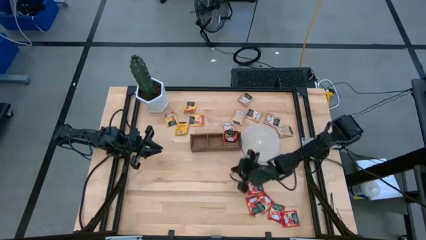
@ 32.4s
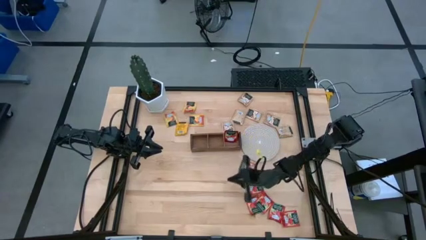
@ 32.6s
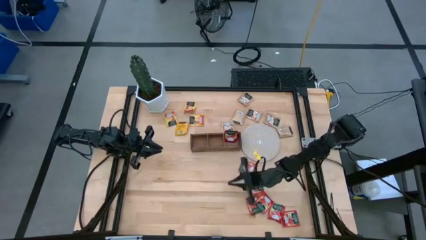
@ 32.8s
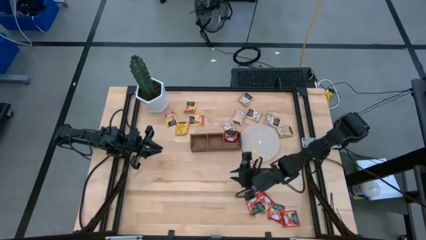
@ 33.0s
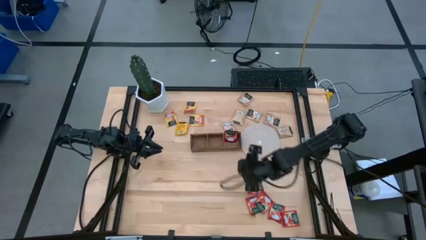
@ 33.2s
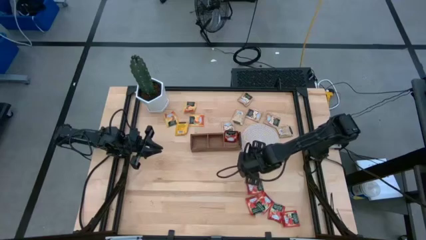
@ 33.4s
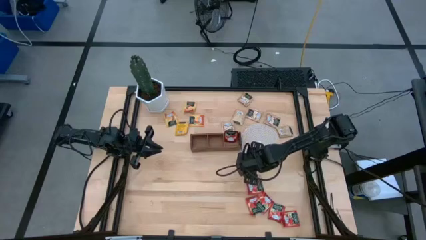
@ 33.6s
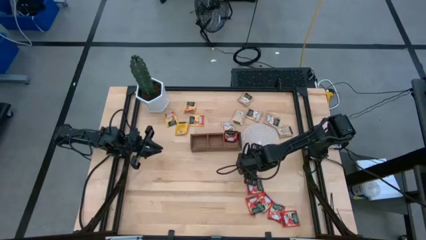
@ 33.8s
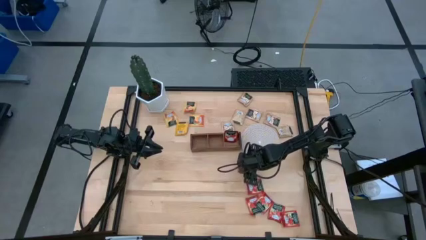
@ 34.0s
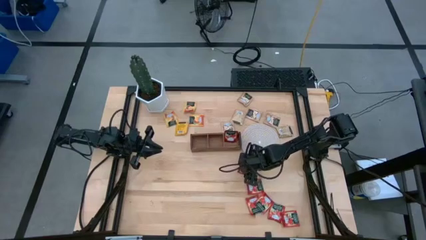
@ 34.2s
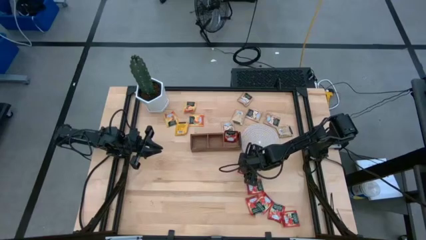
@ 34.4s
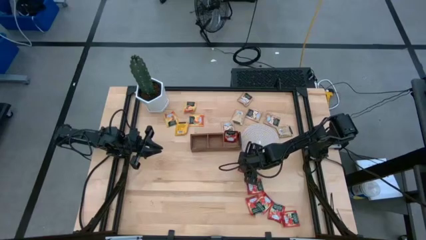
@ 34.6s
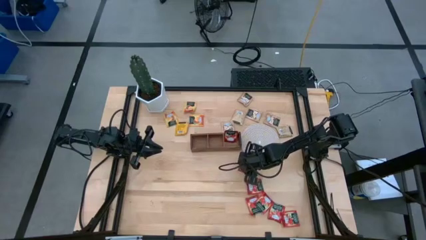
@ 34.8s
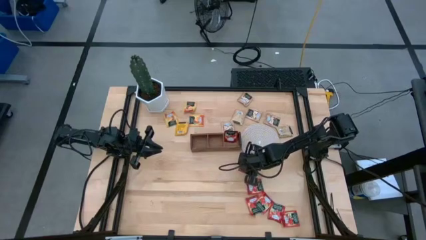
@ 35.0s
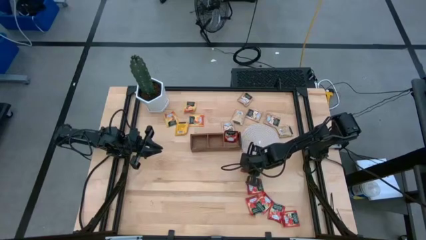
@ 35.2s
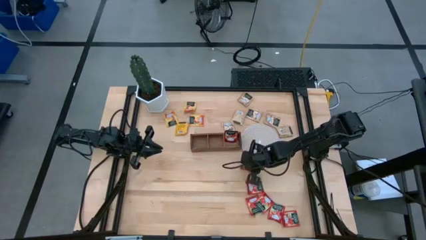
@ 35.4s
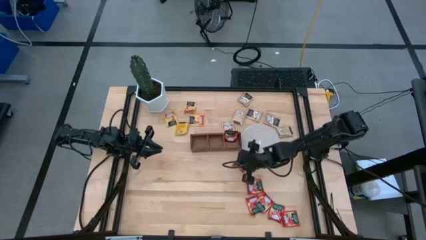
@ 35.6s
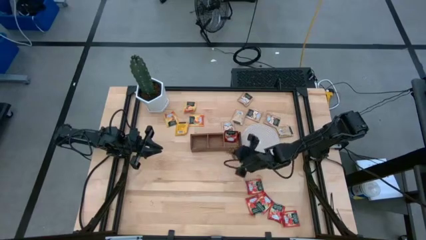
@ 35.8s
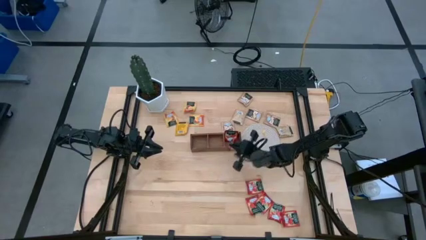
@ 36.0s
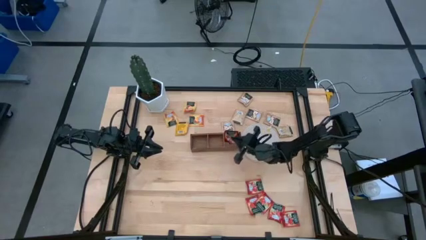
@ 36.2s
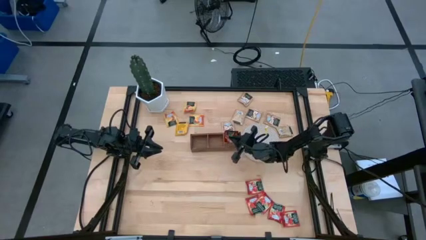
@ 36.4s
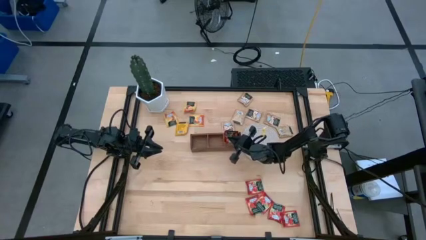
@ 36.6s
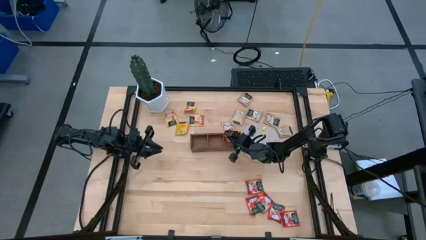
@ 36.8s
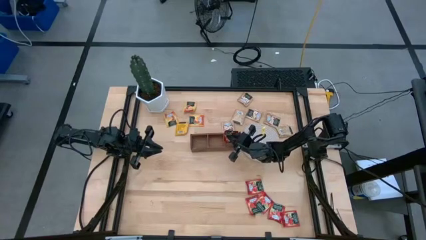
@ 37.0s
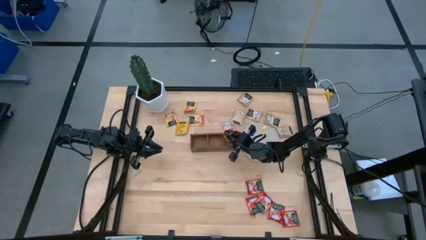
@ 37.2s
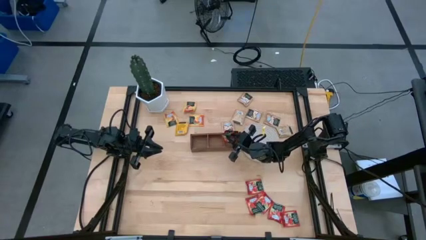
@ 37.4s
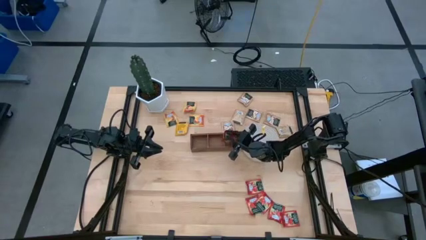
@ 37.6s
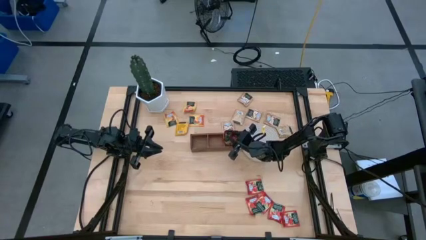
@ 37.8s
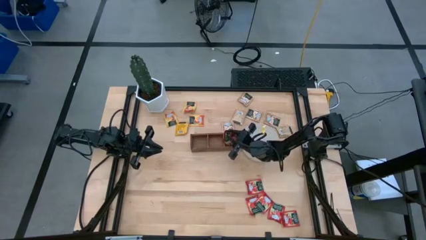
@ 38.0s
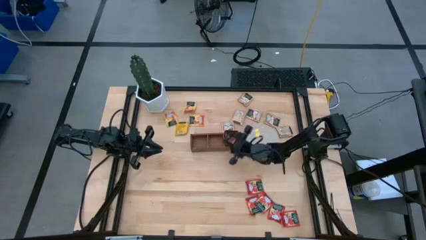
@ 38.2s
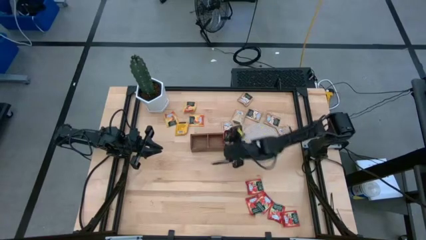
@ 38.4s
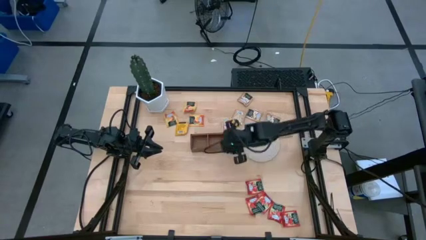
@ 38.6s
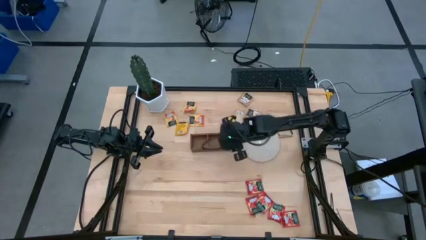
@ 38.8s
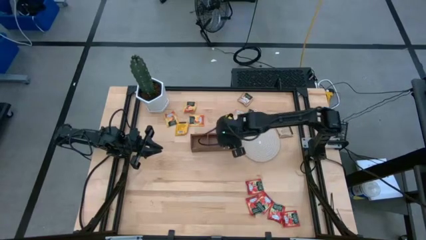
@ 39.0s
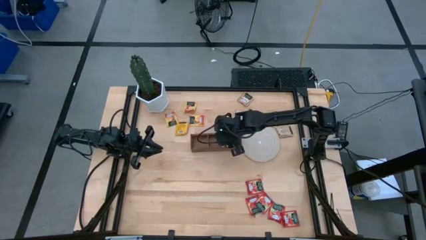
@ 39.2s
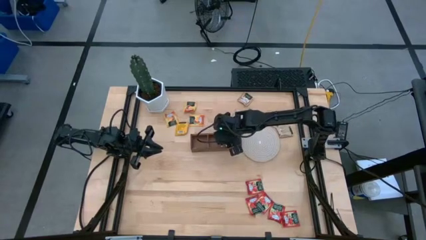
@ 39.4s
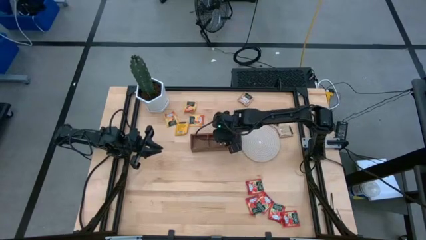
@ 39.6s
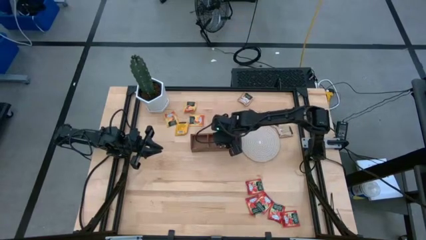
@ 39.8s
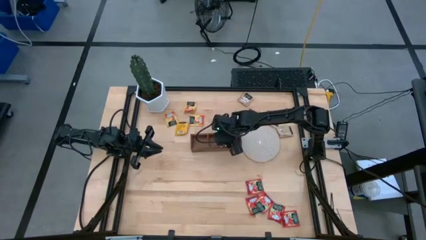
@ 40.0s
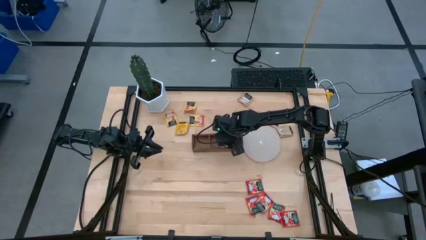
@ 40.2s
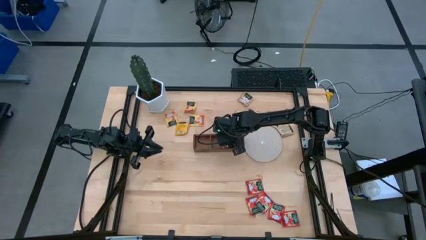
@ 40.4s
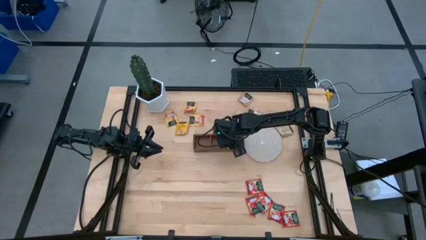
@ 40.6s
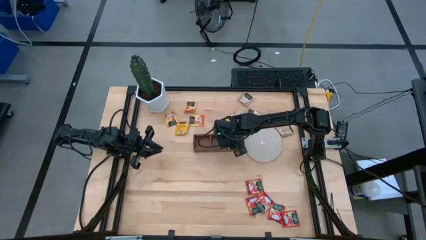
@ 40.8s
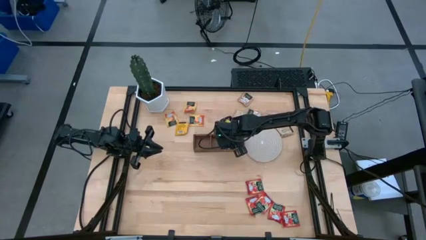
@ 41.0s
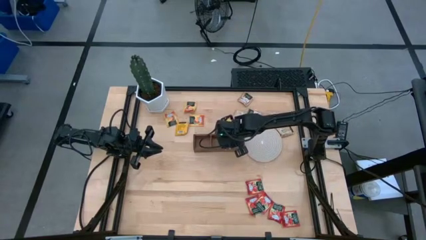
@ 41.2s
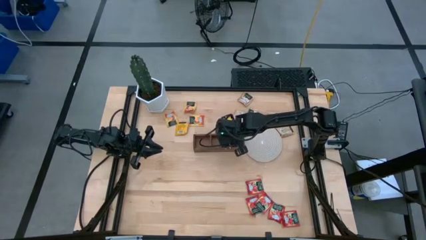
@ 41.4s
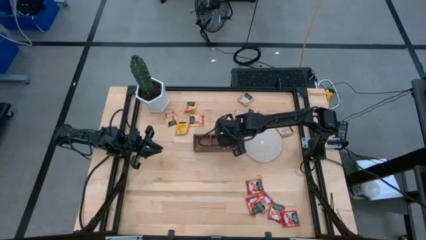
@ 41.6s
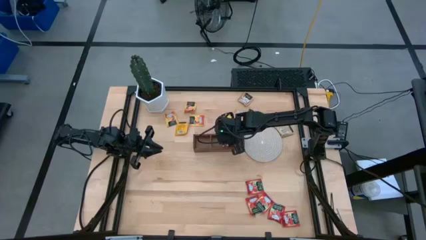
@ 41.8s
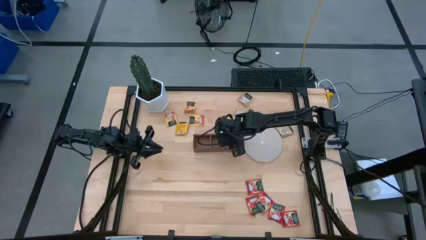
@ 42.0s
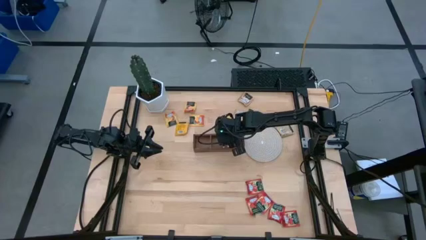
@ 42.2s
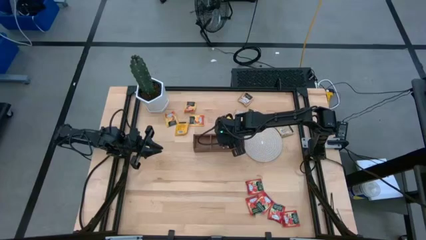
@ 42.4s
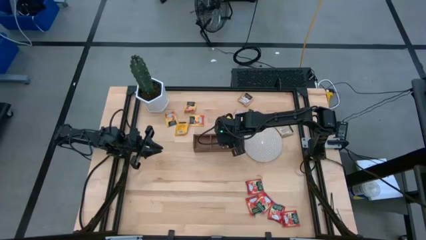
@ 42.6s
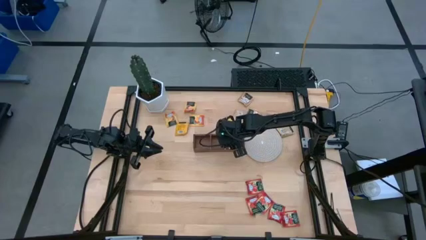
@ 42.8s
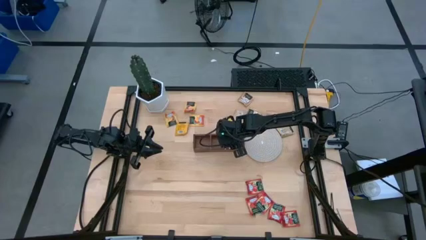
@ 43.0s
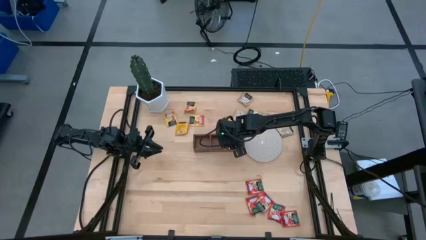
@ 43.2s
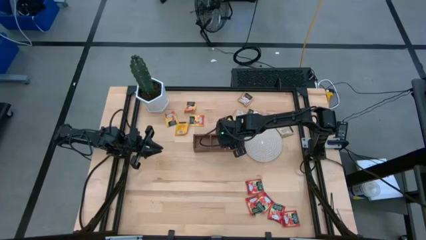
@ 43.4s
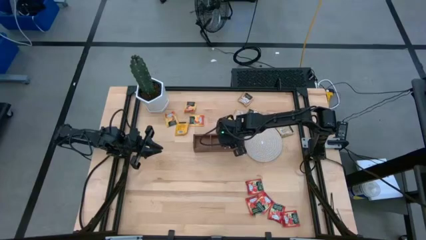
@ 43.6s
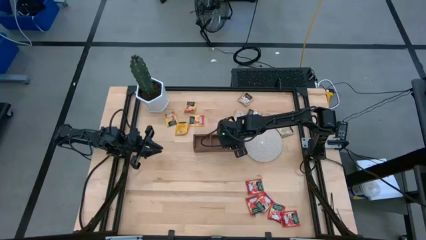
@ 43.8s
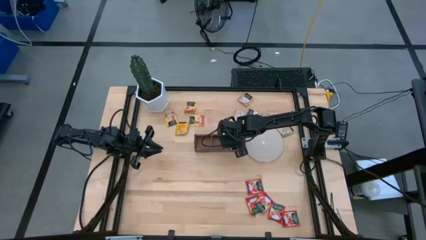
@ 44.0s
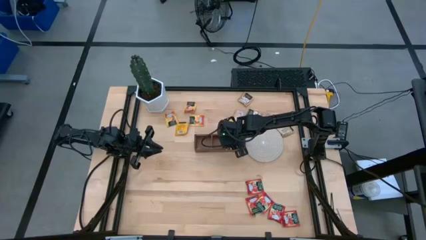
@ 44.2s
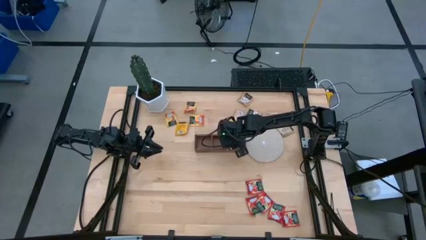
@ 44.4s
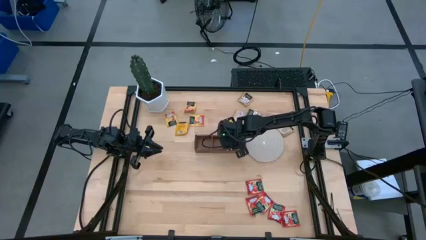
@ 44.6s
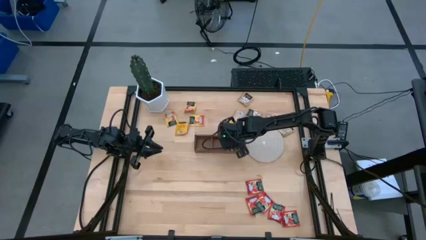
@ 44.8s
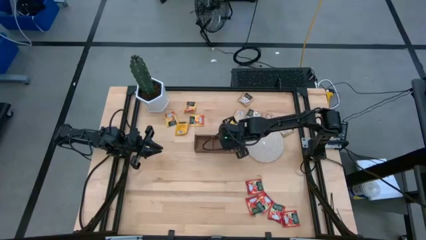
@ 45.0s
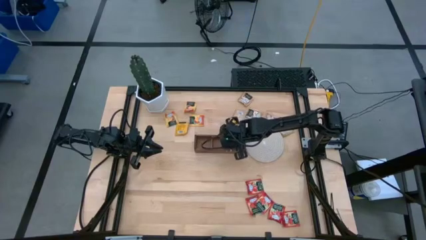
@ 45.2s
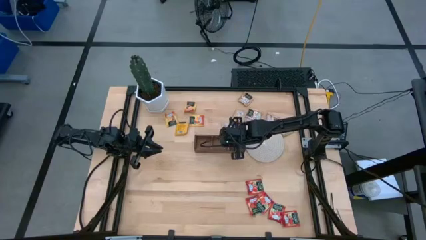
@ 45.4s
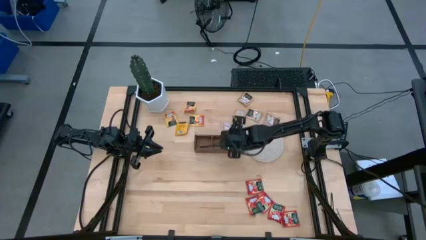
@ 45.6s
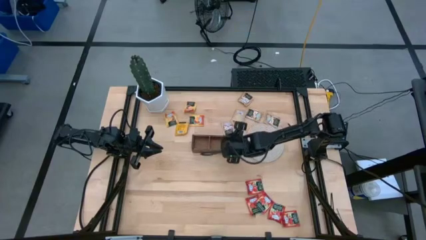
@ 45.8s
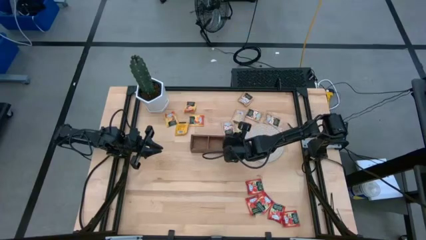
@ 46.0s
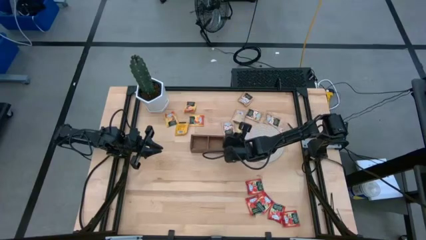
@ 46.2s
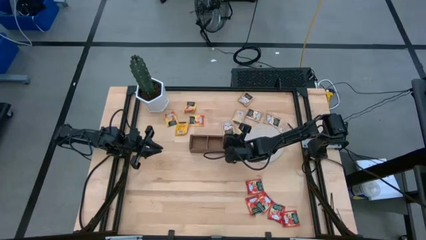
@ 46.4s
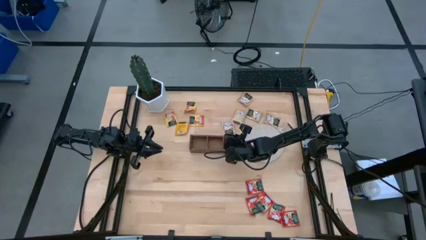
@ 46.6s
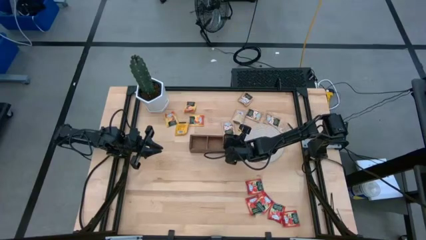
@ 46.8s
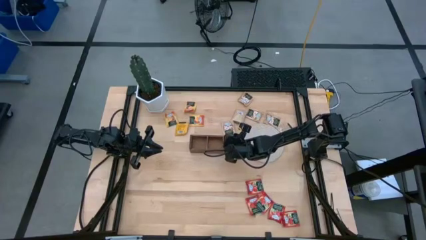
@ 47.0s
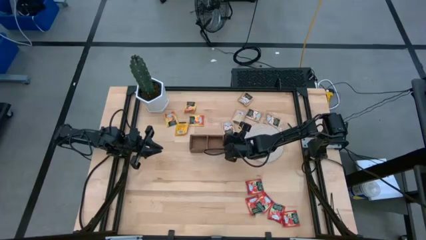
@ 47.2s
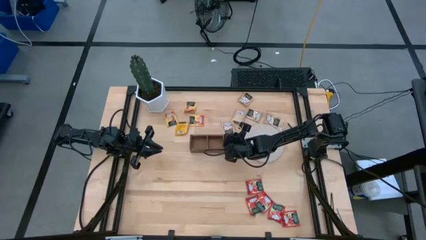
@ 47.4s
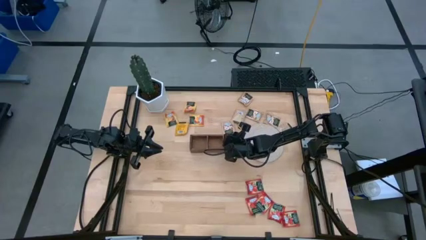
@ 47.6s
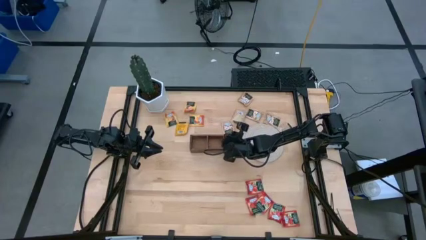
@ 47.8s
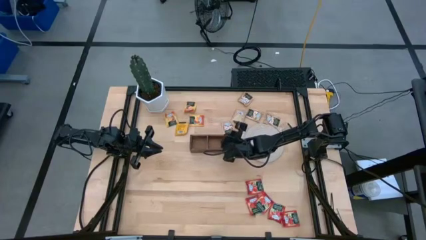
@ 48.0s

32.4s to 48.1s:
Task: Pick & Place Tea
Put the red tea bag into the right section of the wooden organizer

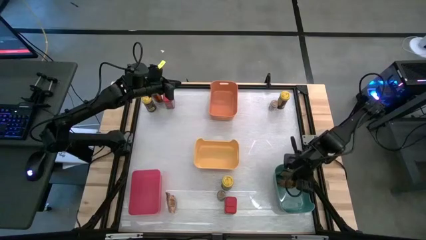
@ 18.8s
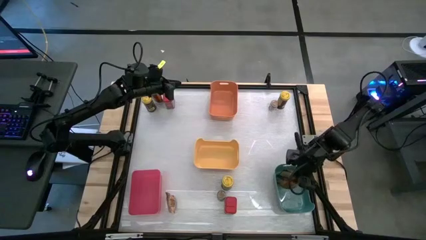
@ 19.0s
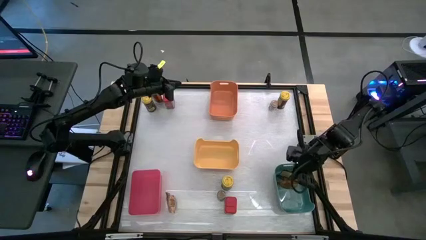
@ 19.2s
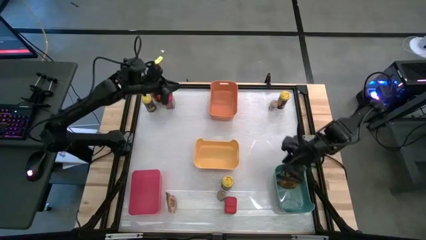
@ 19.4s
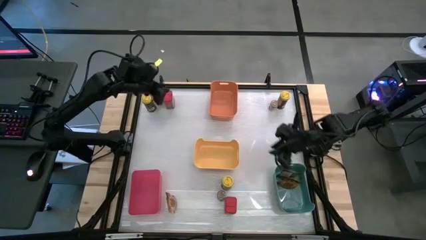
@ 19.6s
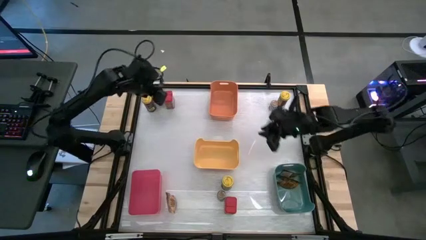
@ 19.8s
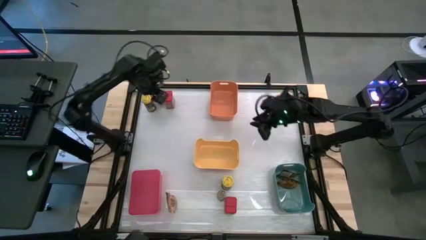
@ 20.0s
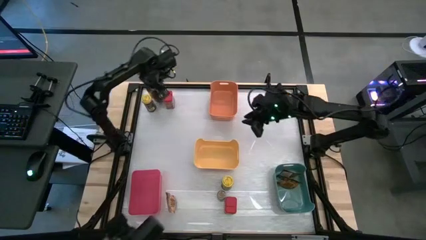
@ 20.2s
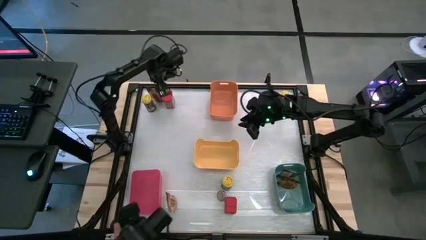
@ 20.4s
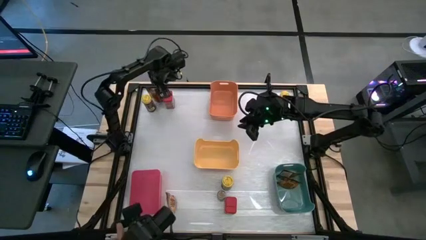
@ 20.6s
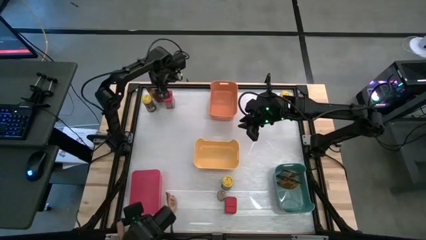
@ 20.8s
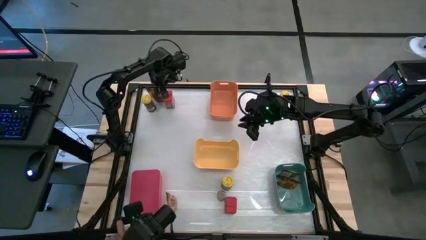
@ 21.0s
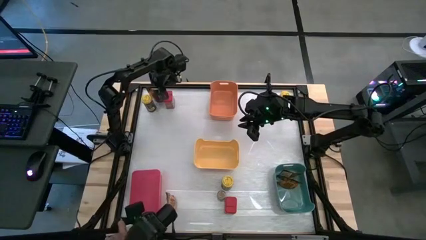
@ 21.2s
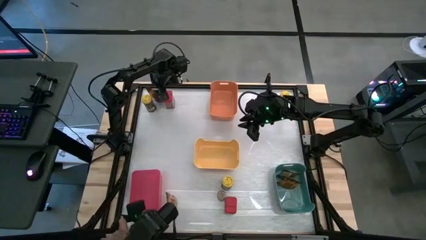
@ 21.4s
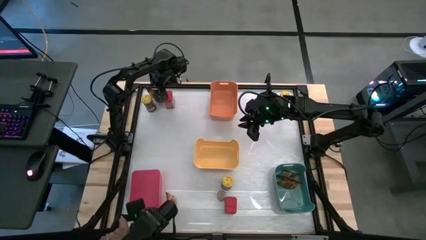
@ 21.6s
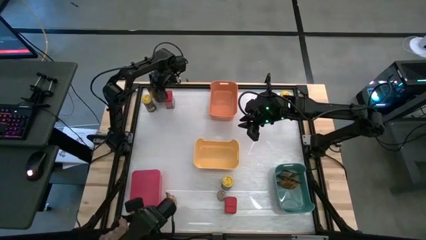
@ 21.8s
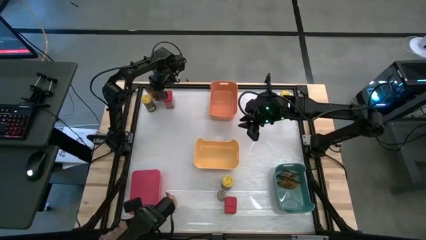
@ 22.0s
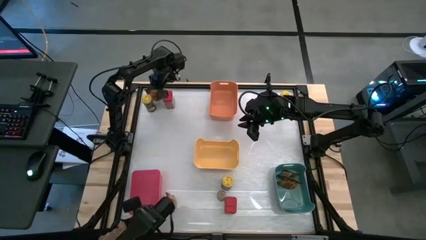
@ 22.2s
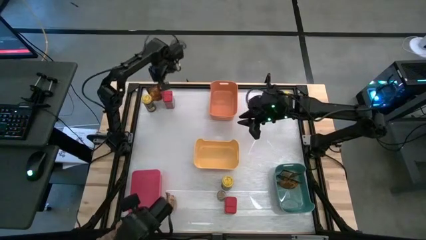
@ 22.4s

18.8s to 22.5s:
Task: Sort spices by type
Put the top orange seasoning bag into the blue bin
